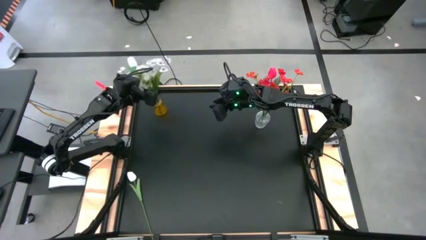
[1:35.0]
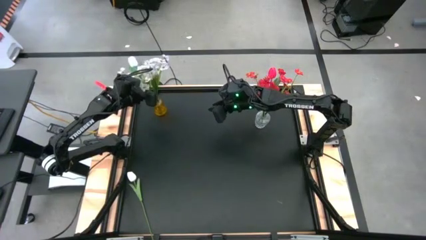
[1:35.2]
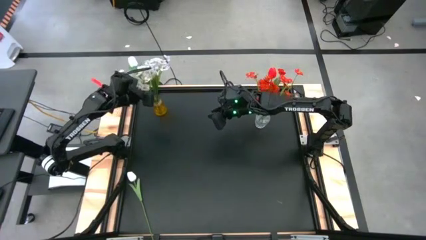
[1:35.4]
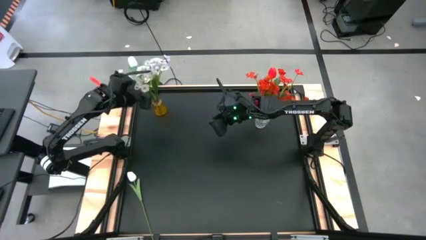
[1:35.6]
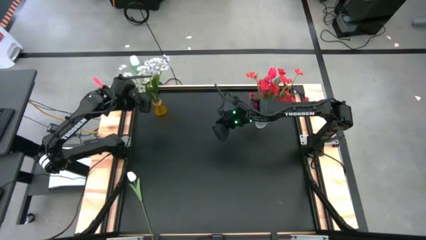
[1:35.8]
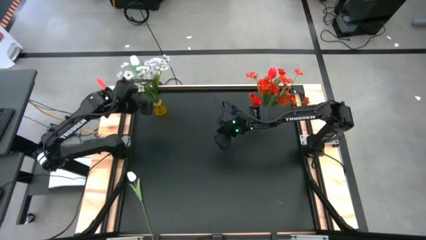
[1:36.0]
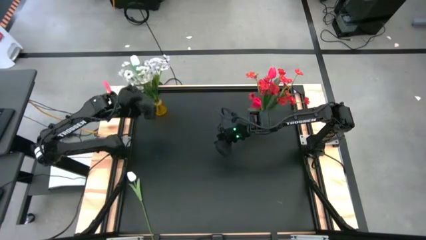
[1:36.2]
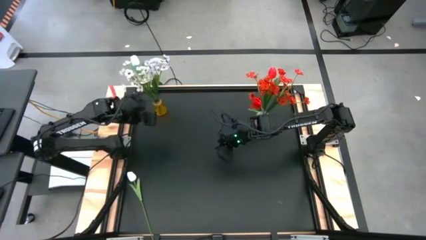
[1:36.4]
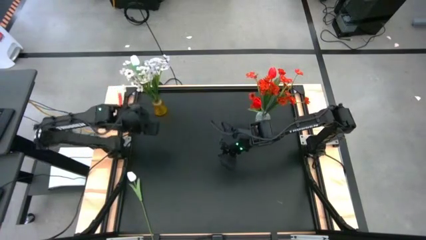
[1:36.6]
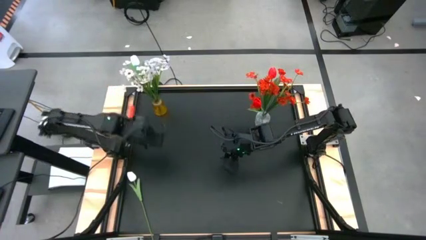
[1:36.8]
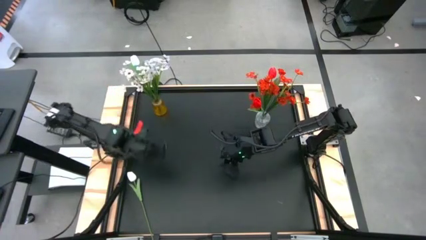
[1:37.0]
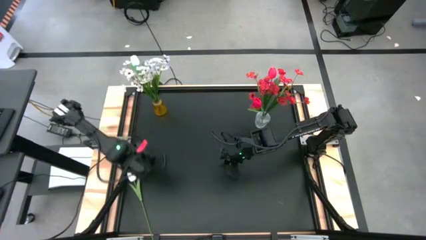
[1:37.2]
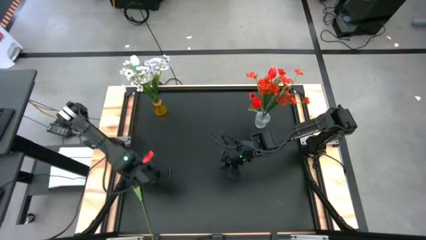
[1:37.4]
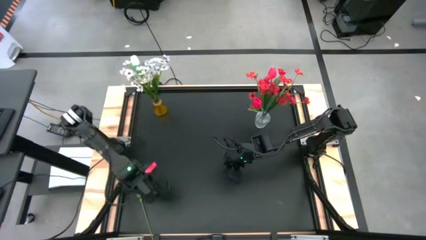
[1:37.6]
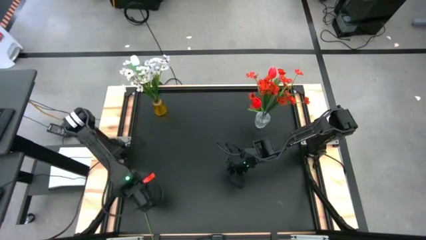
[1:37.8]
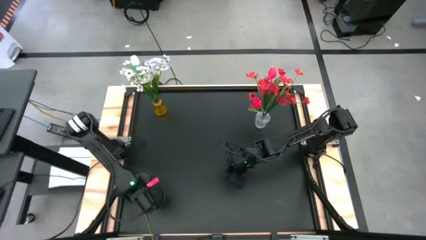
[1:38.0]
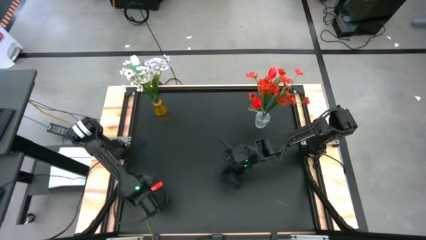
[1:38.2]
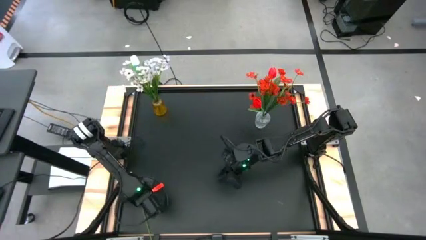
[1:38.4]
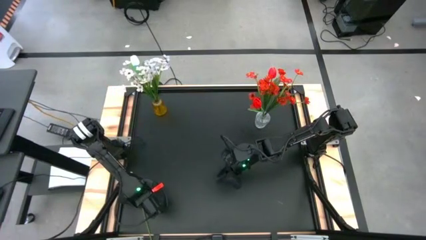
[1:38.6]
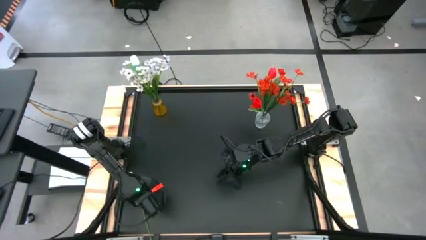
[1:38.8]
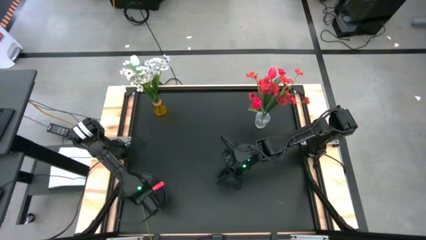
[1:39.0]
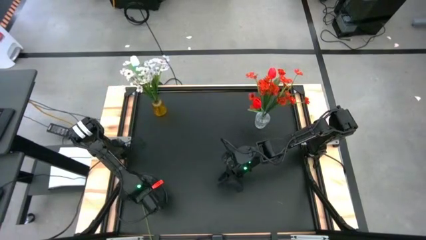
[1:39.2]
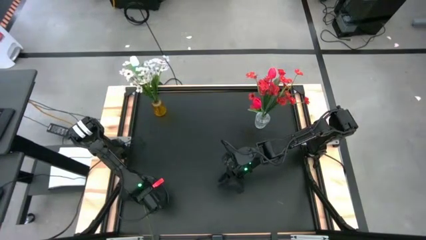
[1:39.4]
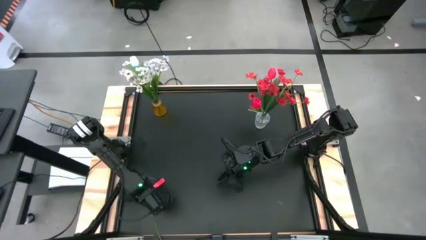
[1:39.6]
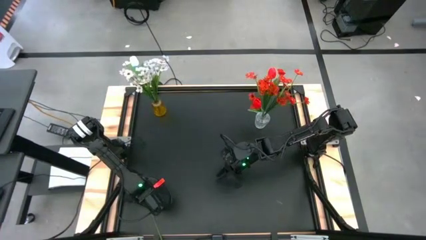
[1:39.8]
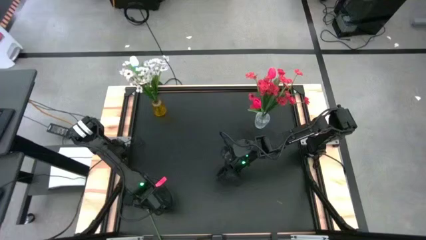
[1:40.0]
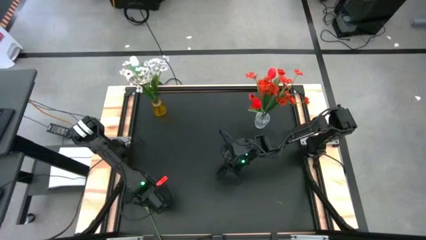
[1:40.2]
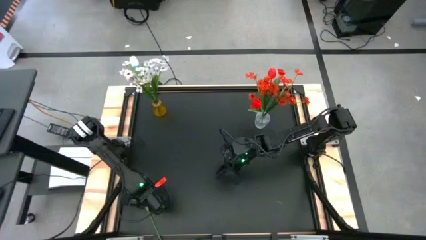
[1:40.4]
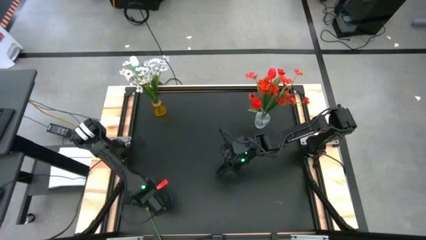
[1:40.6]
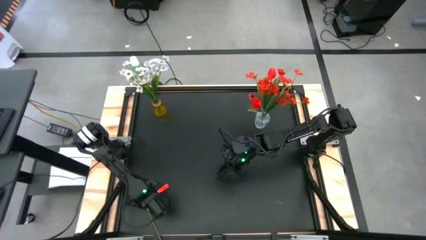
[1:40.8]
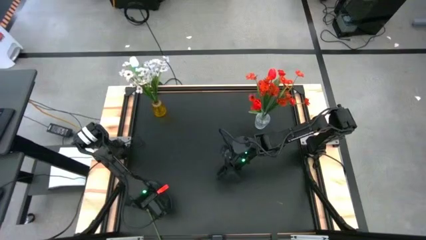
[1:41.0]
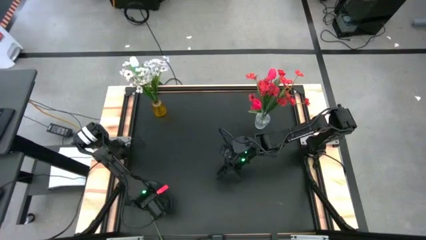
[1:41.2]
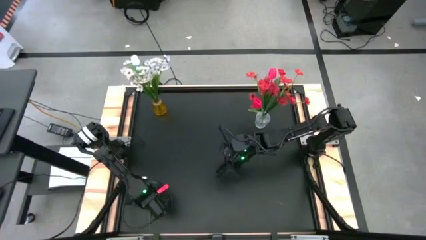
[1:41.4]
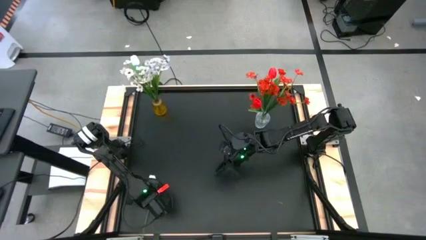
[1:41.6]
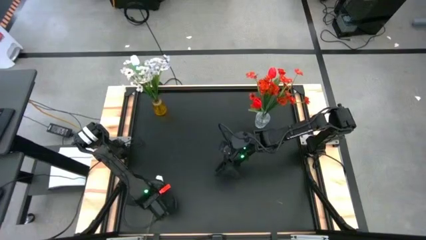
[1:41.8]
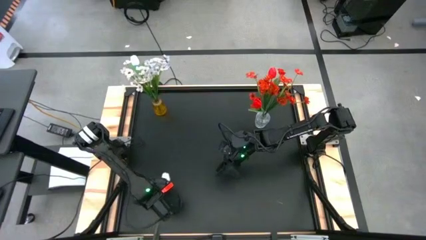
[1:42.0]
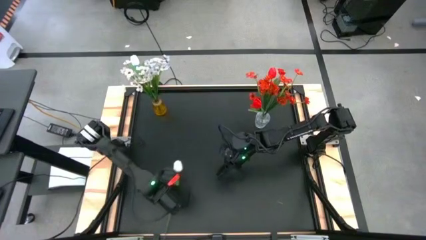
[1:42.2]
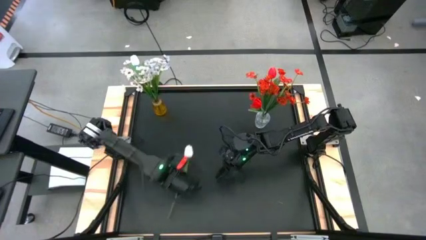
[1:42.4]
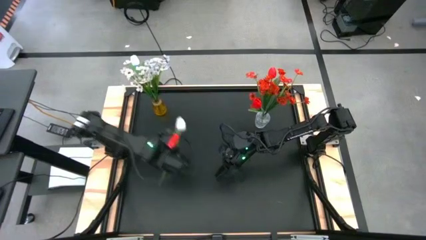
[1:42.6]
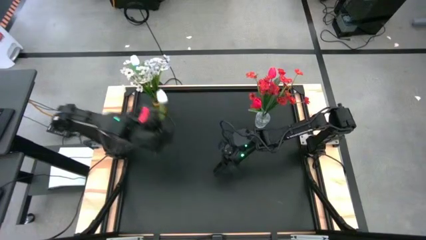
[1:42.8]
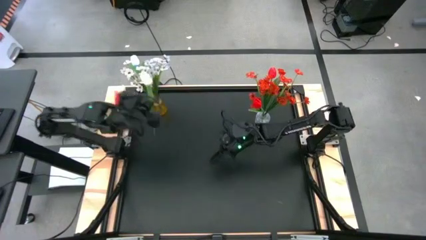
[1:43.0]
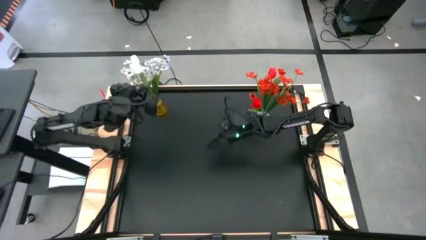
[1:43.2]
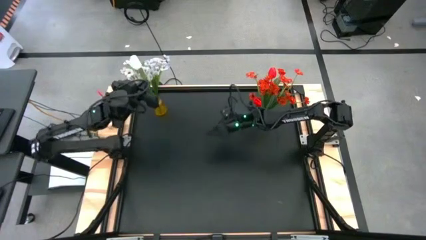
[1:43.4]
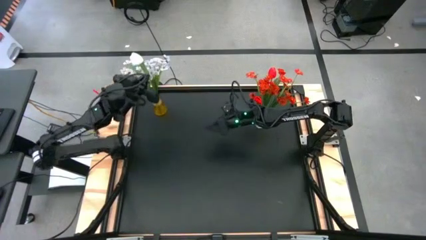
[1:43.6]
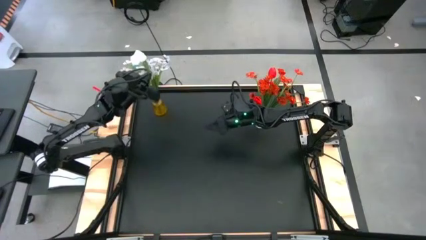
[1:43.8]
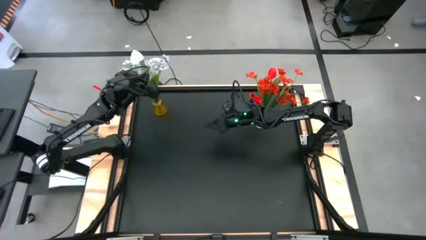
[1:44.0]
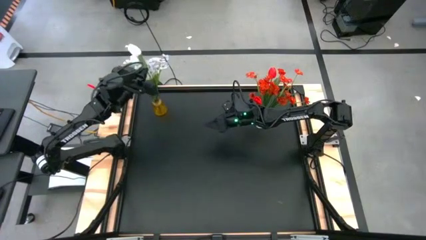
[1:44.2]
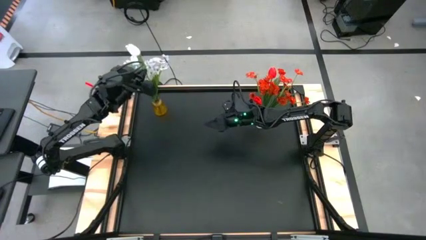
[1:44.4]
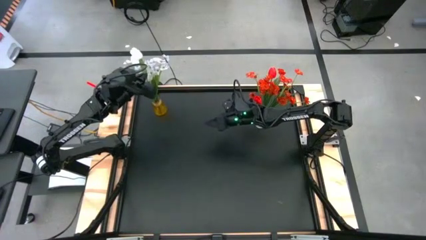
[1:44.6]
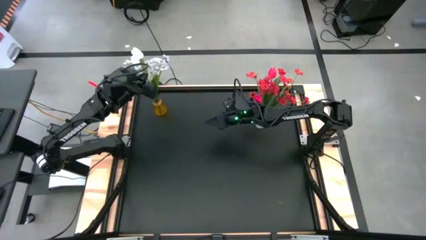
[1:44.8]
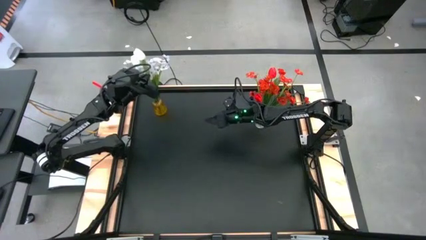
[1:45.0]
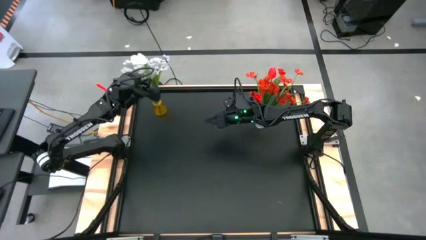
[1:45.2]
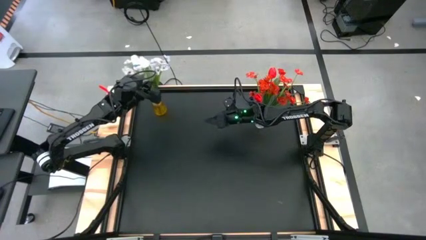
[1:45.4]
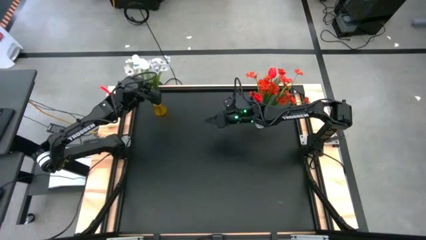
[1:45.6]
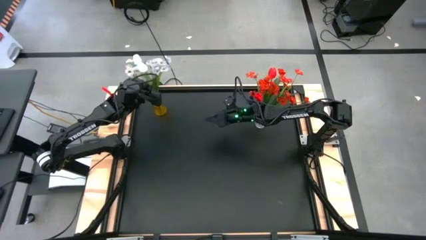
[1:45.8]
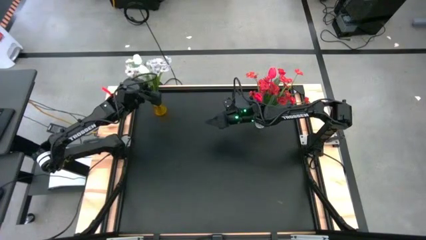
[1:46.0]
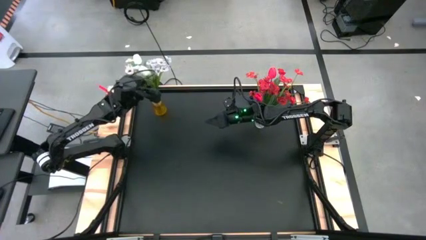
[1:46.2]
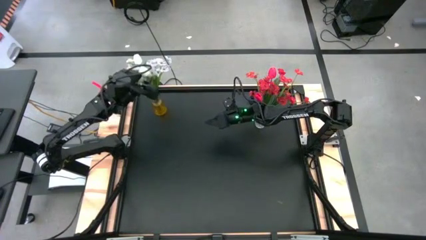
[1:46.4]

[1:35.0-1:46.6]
Task: Sort flowers into vase by color
Put the right white flower into the yellow vase

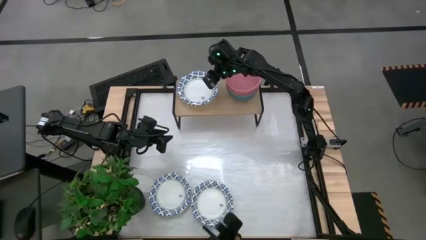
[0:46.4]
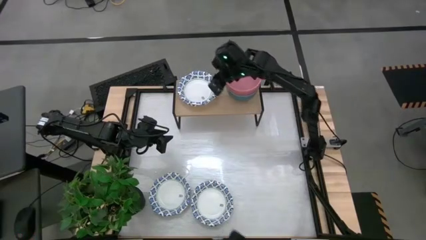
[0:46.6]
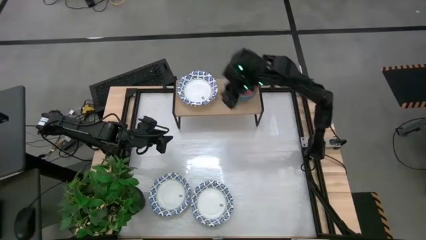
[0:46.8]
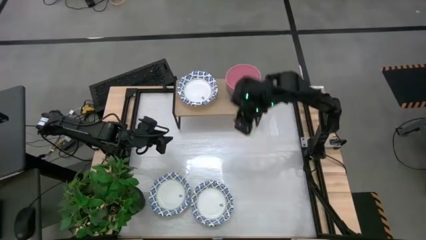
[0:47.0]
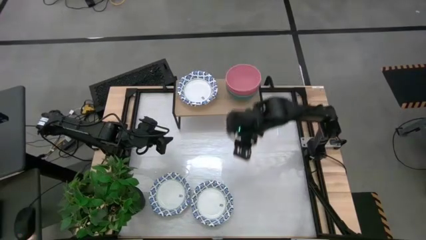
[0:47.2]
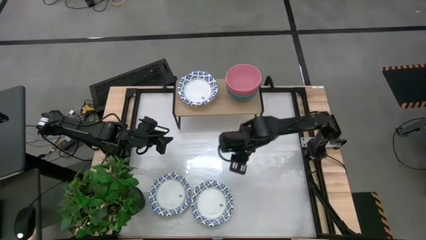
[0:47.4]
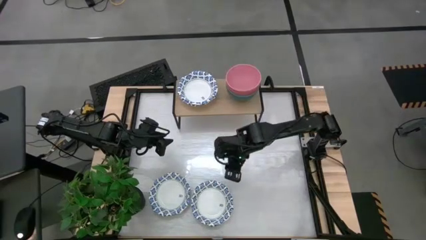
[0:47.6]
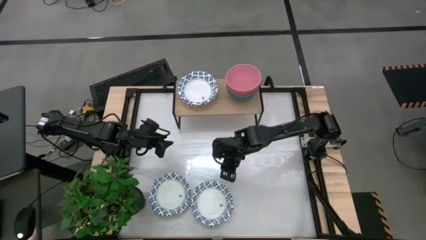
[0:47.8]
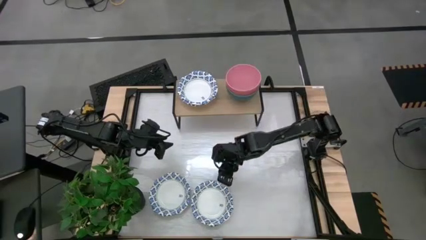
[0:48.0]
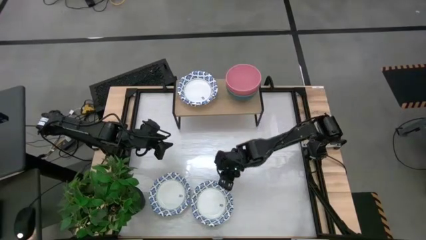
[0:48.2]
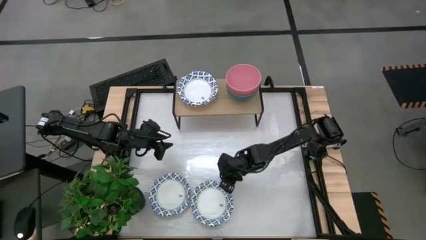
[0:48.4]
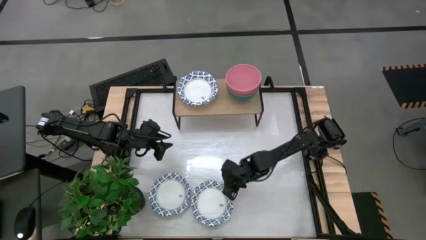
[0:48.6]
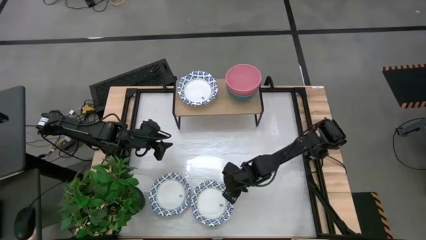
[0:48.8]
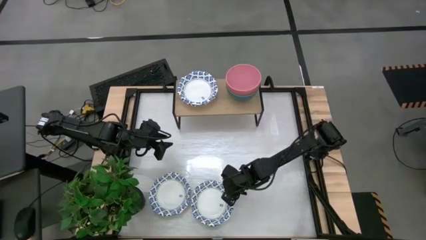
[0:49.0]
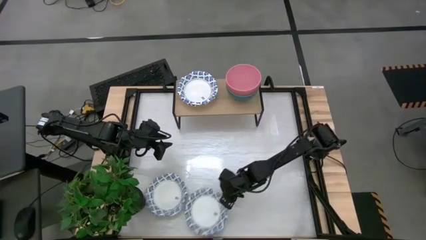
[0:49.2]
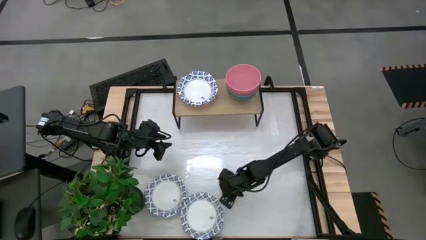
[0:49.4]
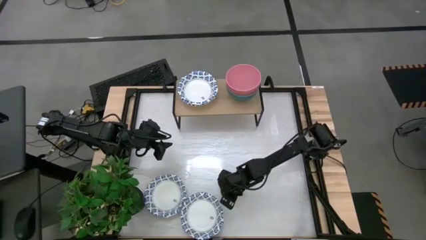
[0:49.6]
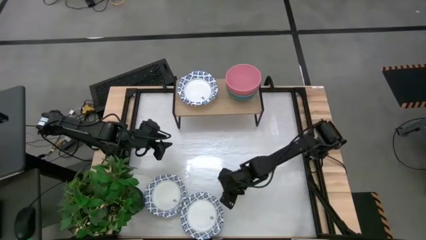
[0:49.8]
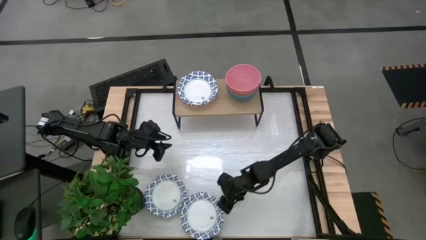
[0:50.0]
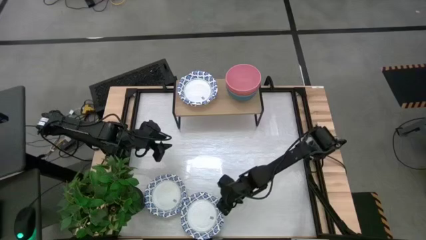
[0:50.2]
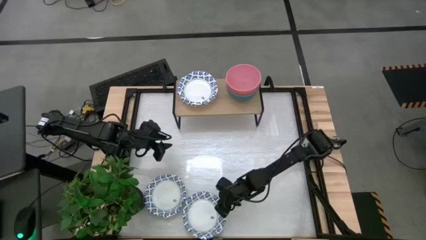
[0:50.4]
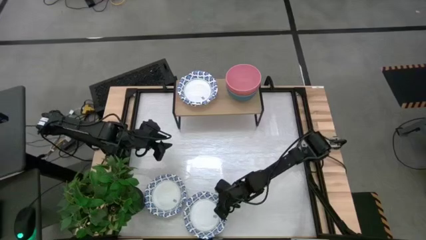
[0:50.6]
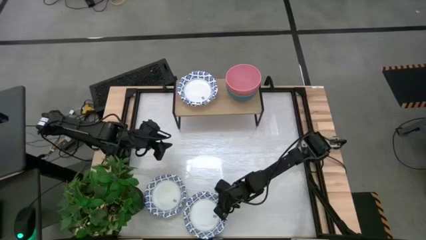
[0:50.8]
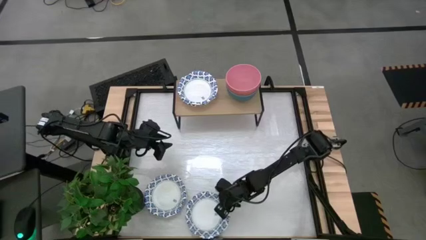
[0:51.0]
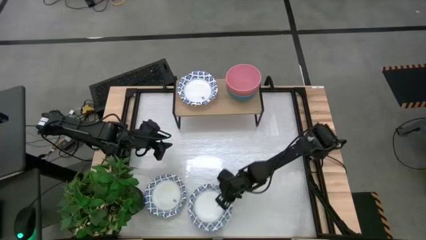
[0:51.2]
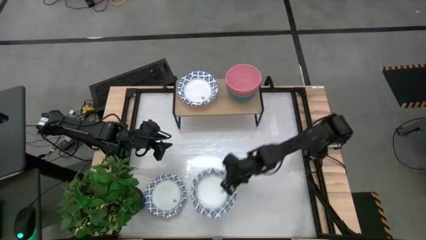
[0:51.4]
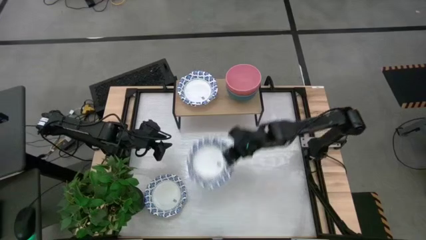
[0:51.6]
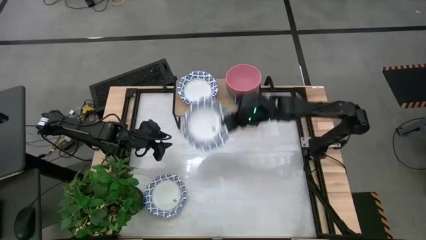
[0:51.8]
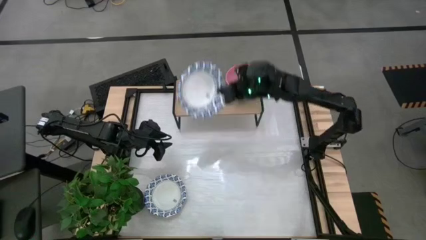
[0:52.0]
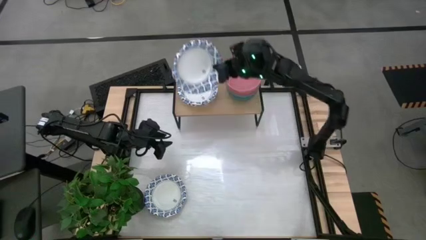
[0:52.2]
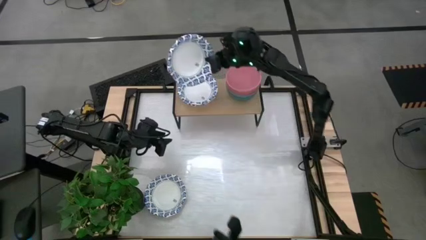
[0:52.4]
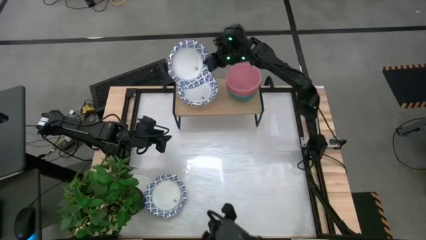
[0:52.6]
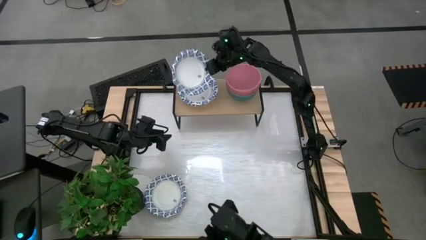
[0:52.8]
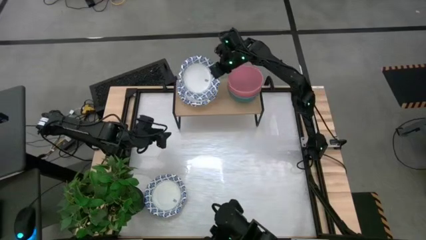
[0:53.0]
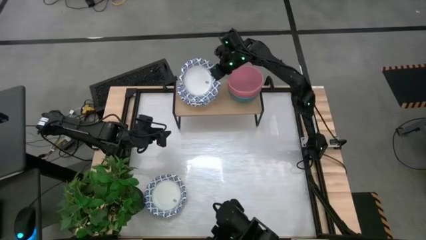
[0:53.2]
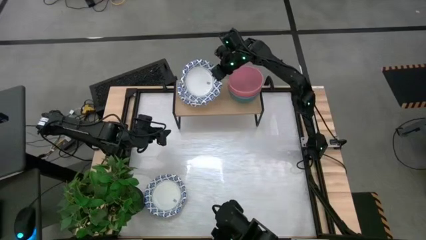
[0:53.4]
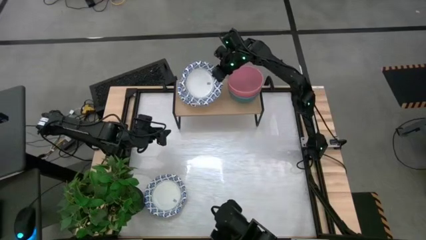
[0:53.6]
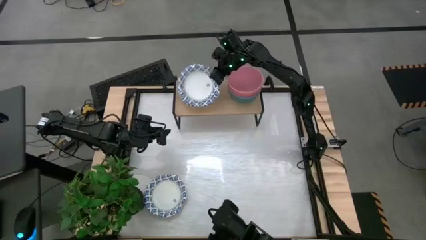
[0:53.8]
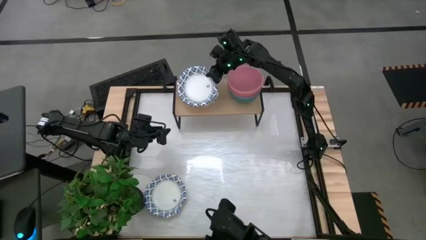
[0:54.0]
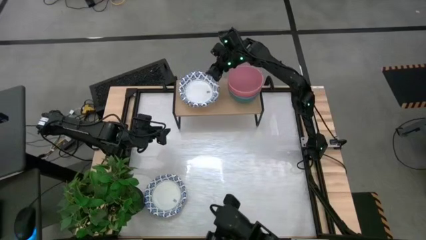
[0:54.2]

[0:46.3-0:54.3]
Task: Place and stack bowls onto a shelf
Stack the blue patterned bowl on top of the blue patterned bowls on the shelf
